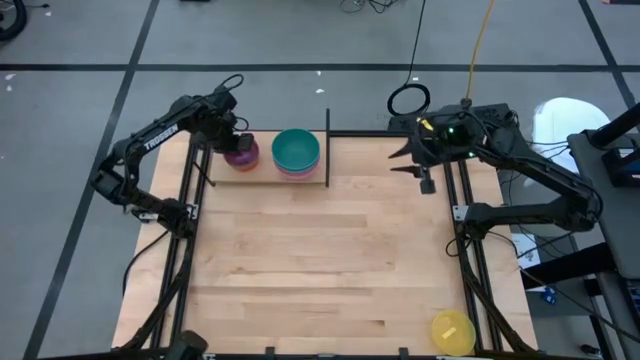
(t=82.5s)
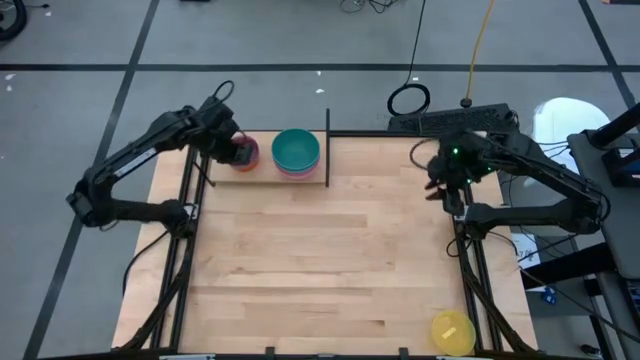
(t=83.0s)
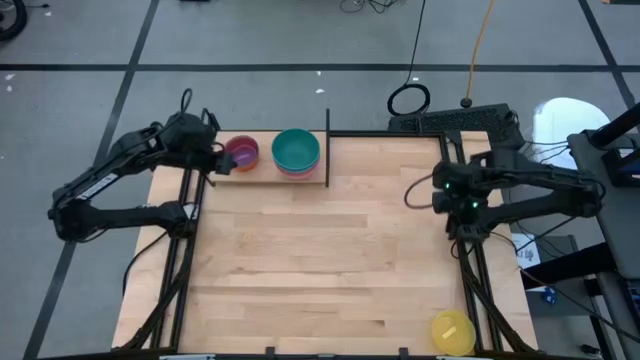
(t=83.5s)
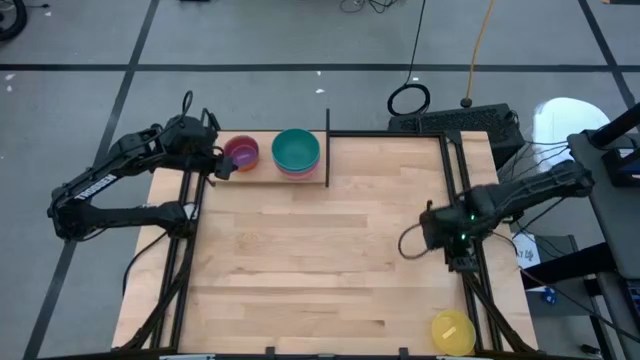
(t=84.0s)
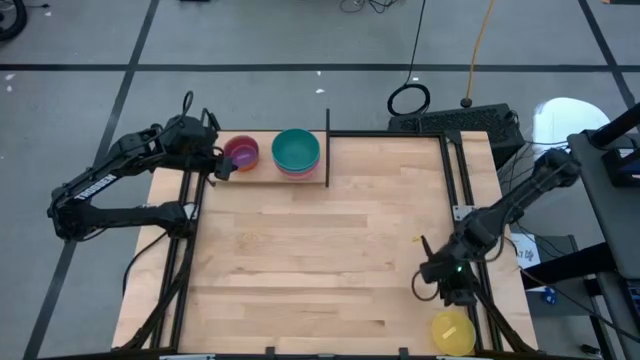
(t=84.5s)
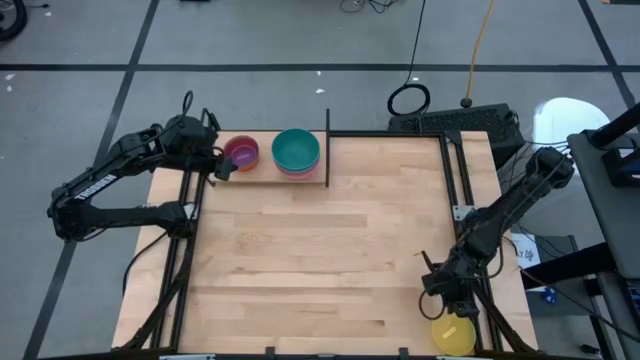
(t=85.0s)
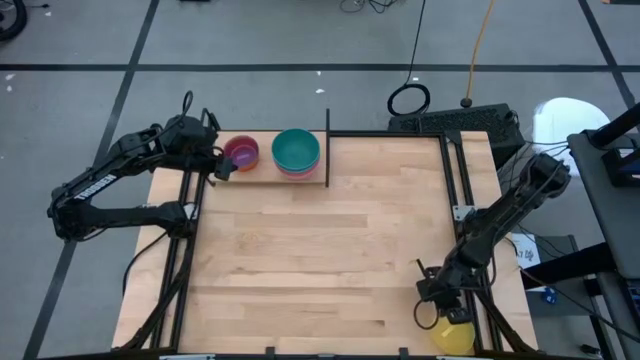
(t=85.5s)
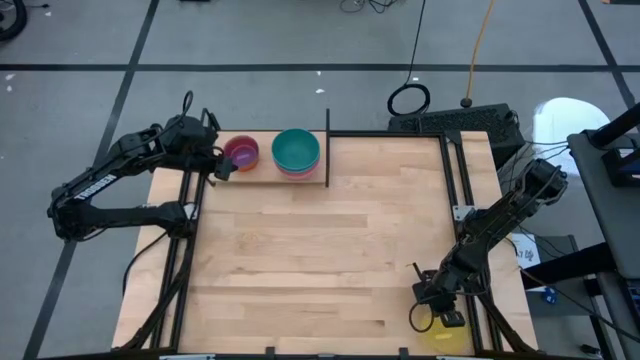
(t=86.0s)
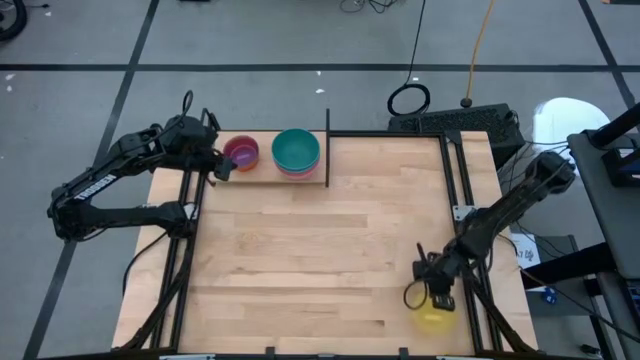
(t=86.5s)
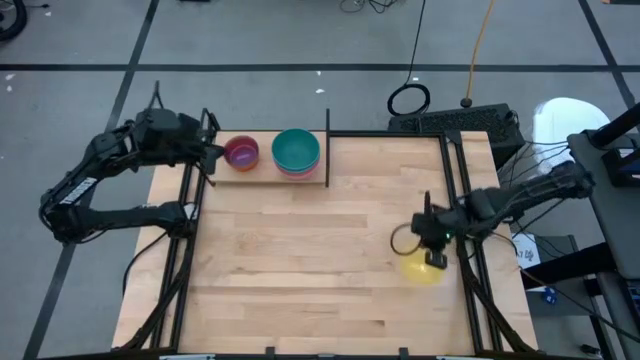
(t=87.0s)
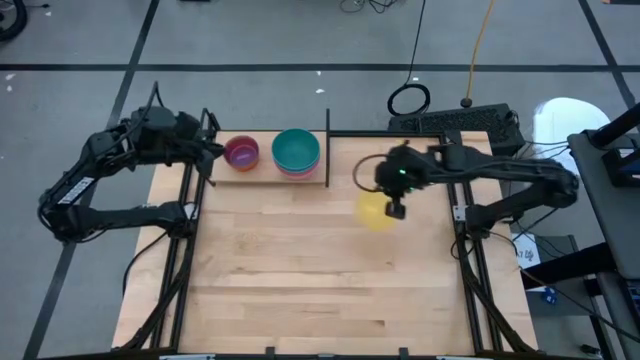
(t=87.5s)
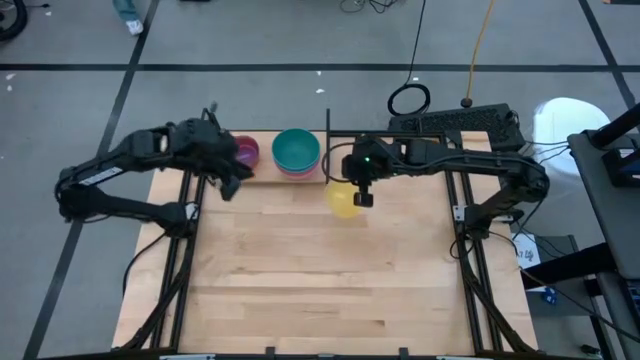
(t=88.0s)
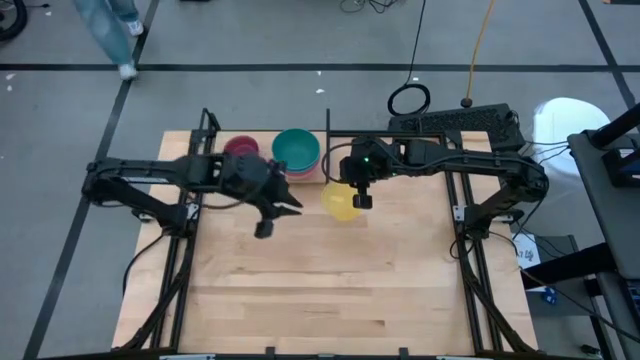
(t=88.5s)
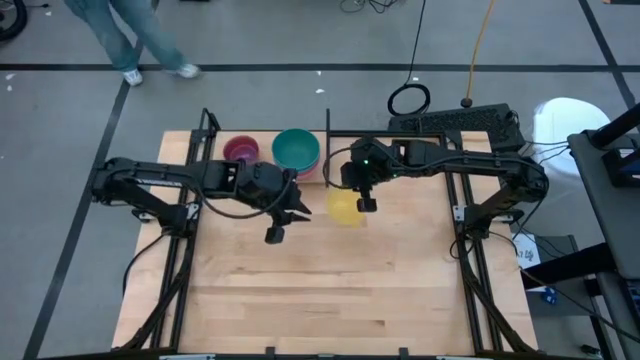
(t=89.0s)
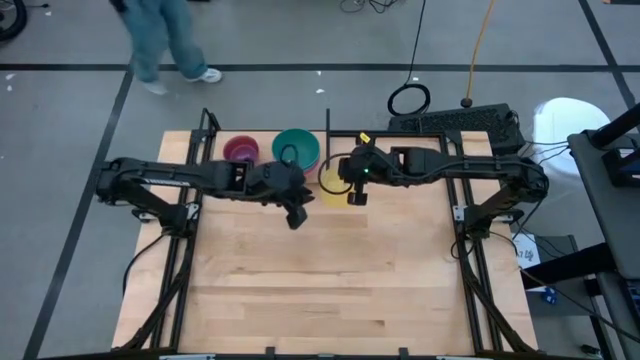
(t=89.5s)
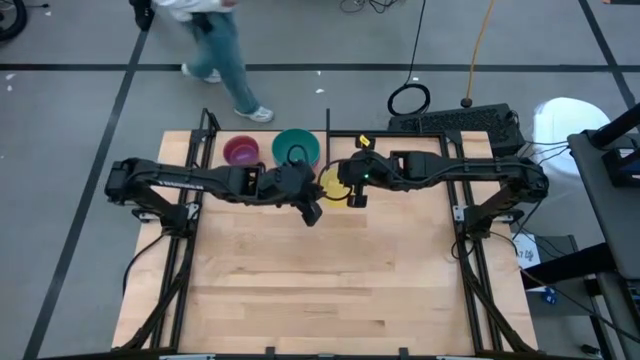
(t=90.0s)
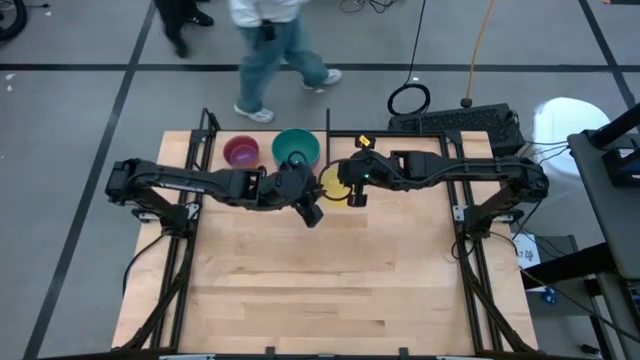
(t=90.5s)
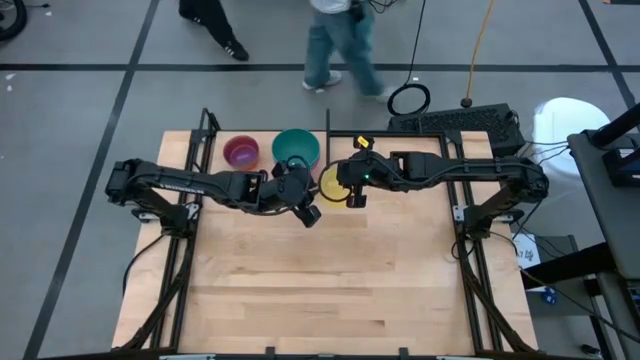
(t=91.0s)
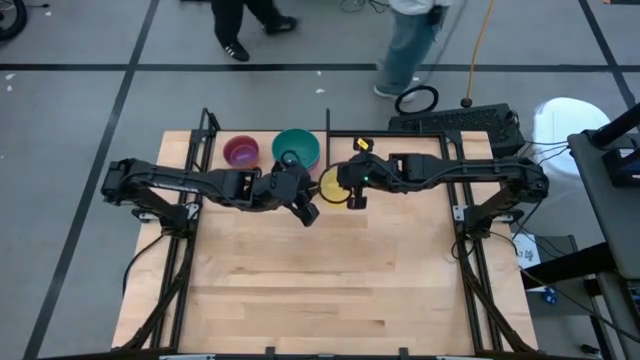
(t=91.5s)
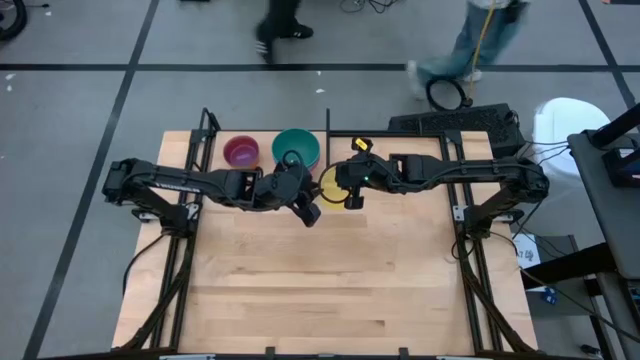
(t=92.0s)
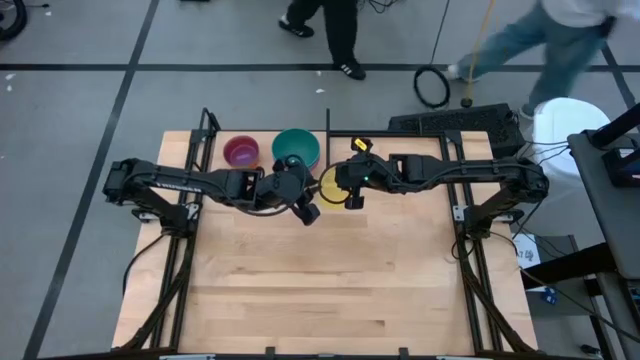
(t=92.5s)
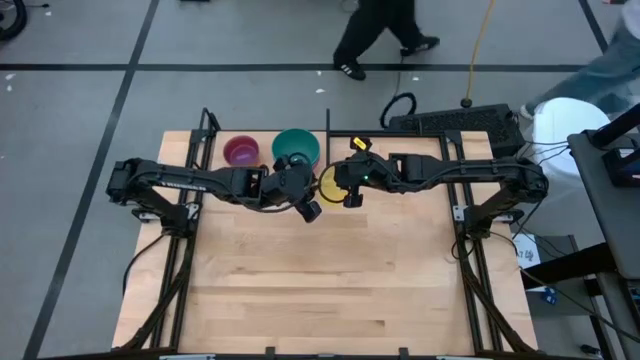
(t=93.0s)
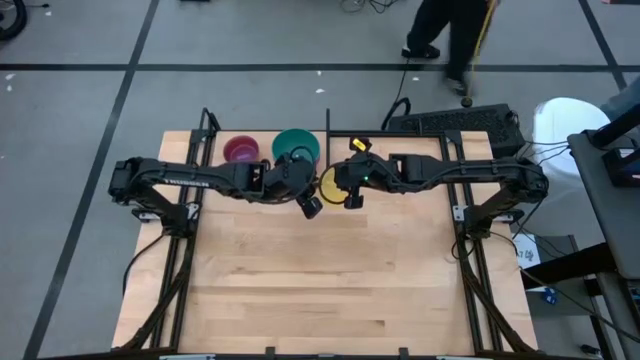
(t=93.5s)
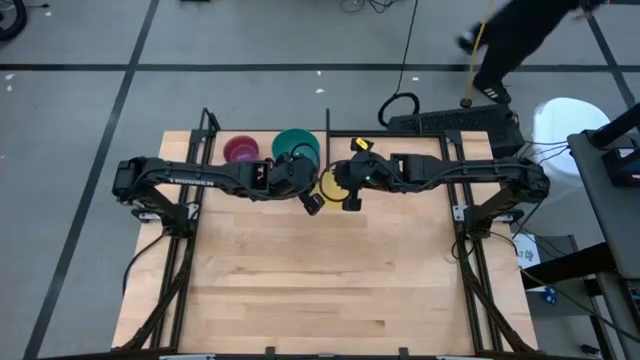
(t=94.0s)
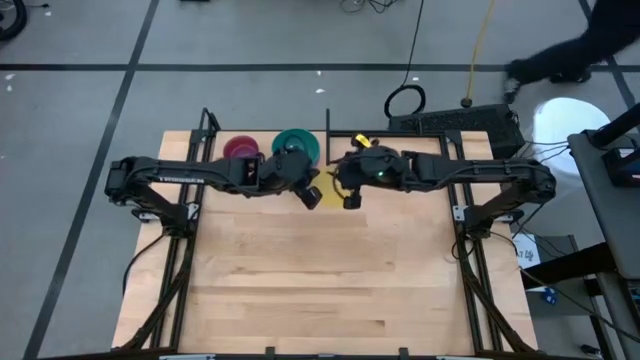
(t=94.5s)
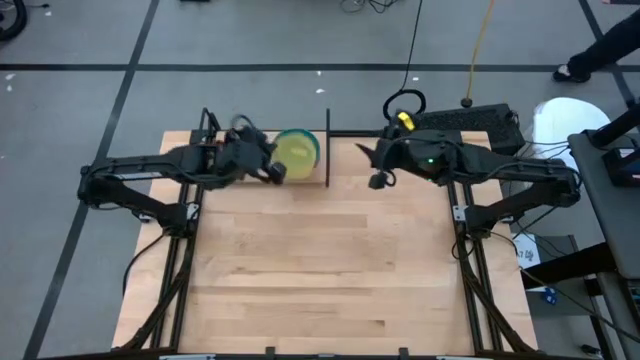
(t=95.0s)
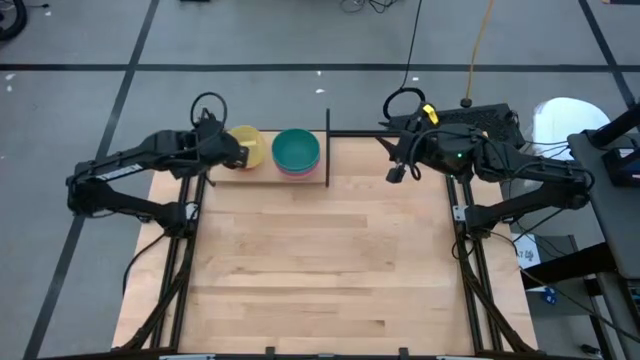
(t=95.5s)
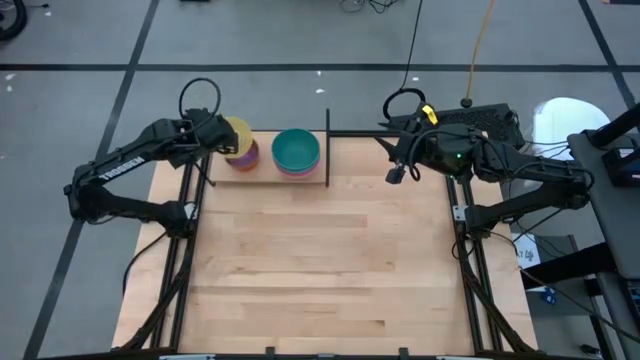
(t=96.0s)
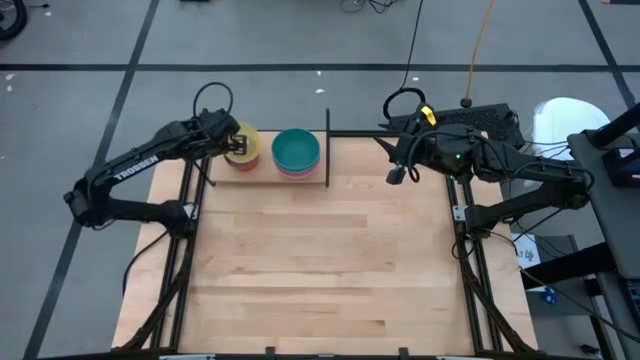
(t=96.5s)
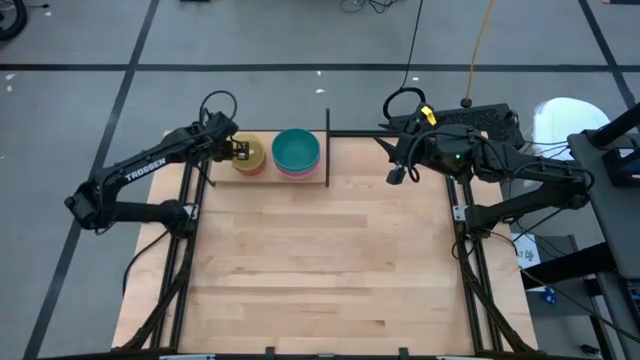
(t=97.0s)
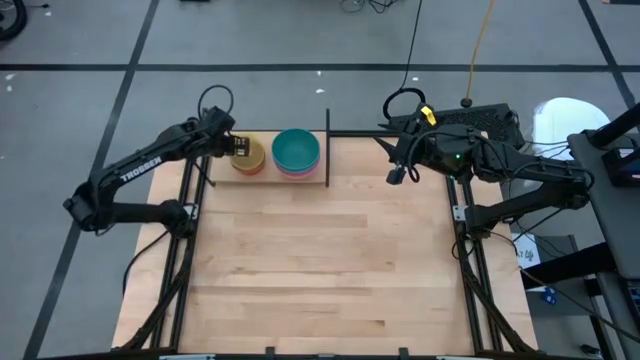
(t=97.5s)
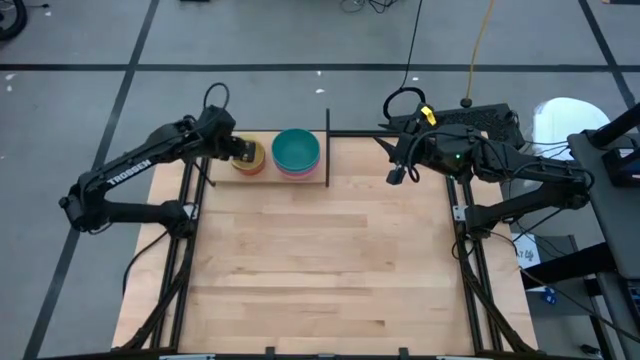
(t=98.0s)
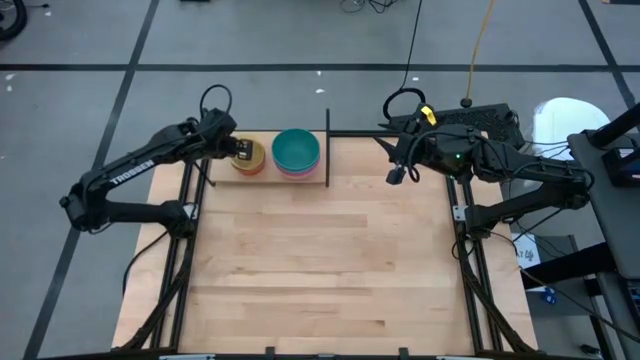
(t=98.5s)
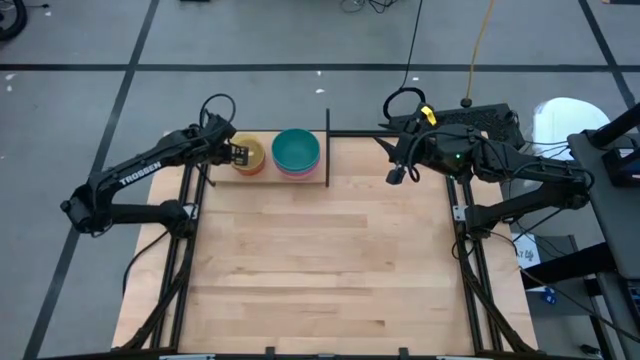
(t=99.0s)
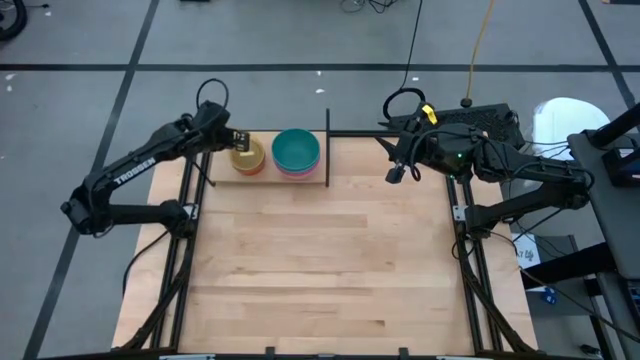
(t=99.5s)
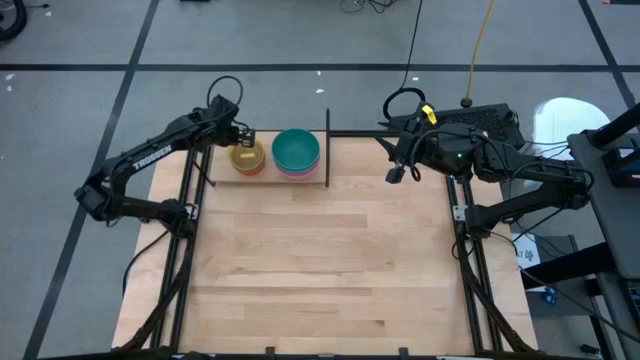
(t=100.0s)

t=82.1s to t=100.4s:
Task: Place and stack bowls onto a shelf
Stack the yellow bowl on the purple bowl on the shelf

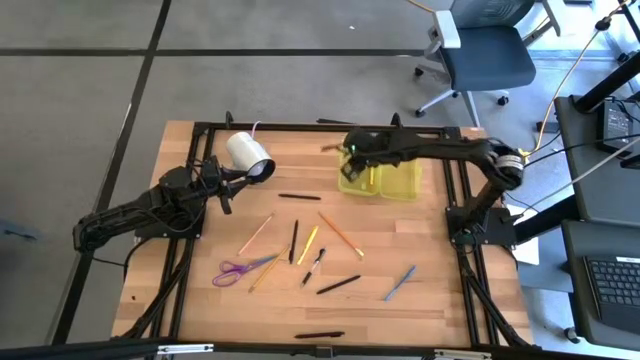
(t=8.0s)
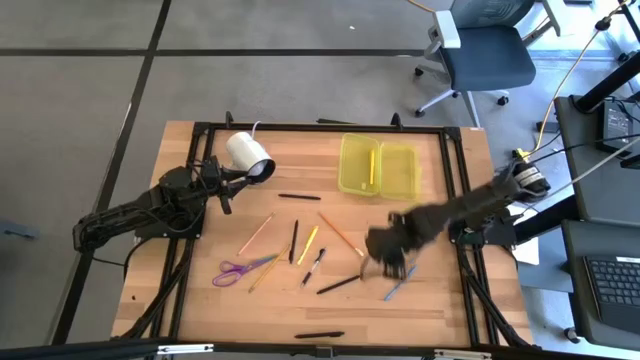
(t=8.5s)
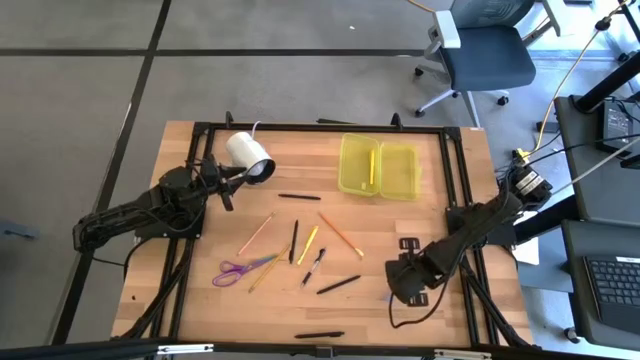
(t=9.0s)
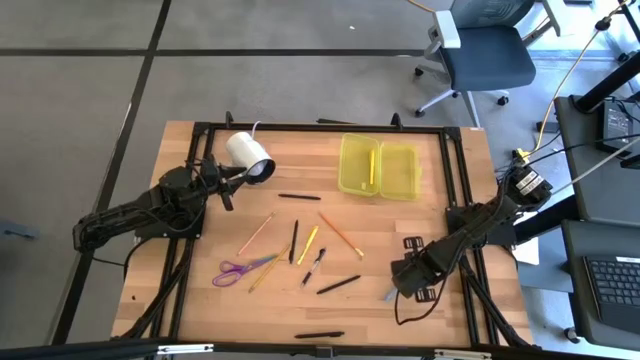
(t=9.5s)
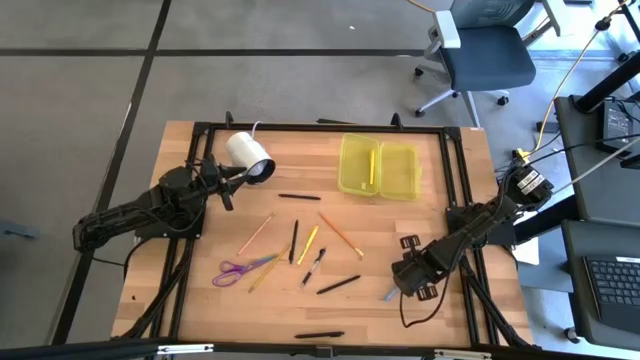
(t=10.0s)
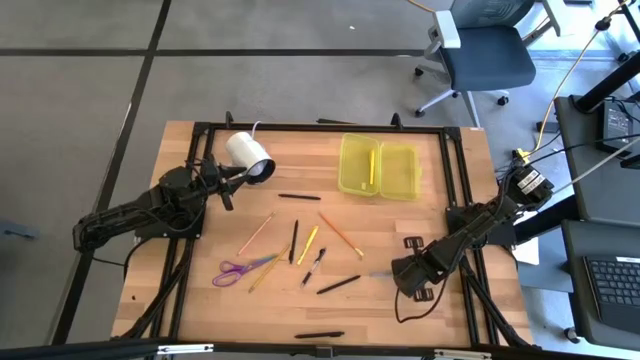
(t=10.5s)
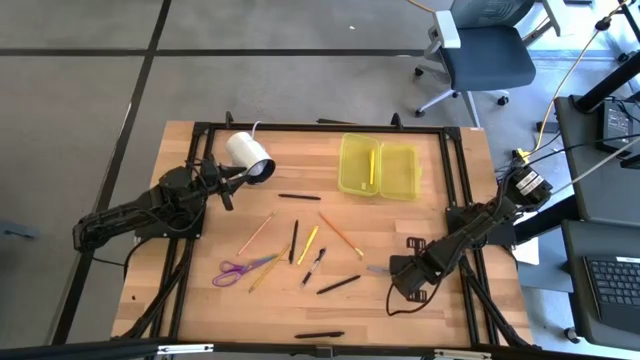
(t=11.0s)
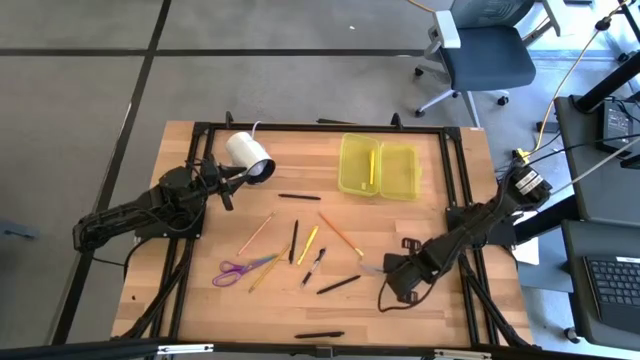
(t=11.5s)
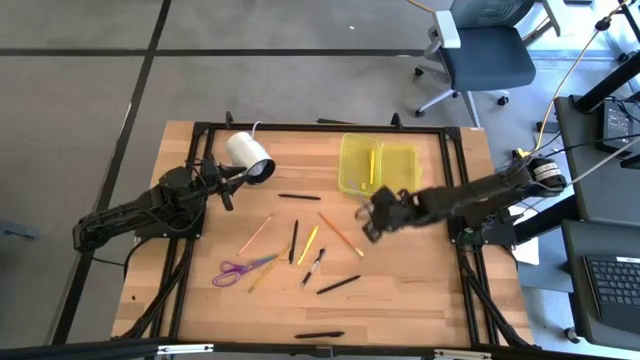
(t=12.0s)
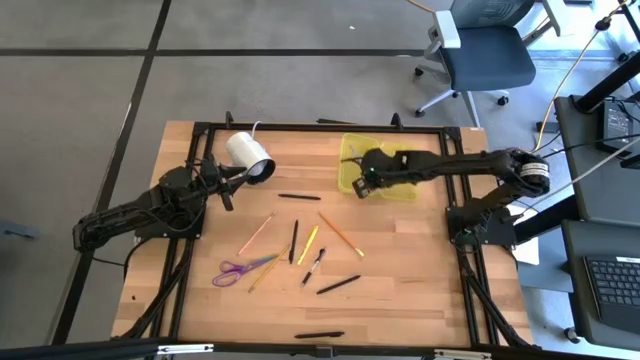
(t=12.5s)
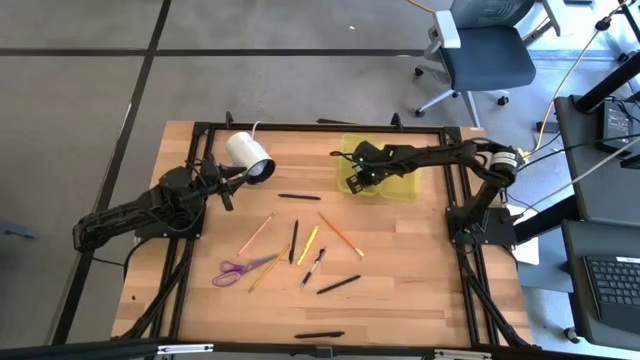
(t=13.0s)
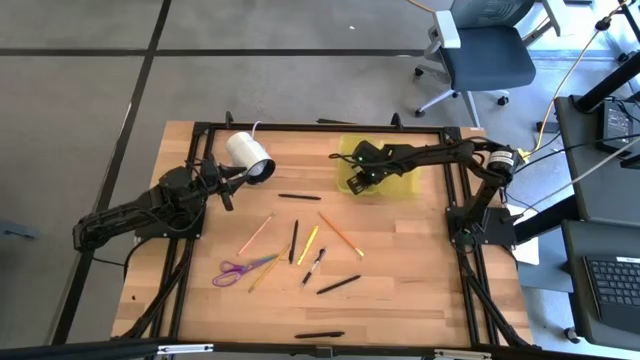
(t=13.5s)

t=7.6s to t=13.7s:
Task: Pick & place school supplies into a supply box
Put the blue pen into the yellow supply box
